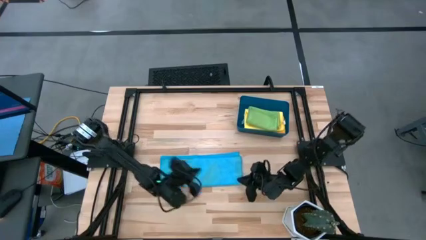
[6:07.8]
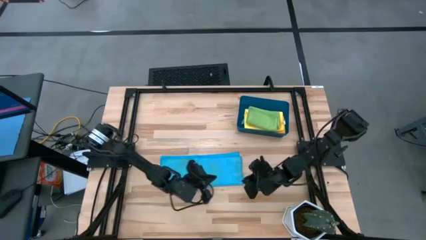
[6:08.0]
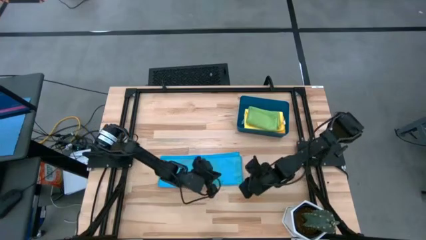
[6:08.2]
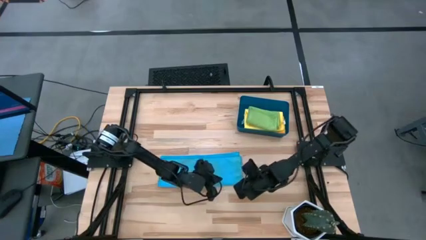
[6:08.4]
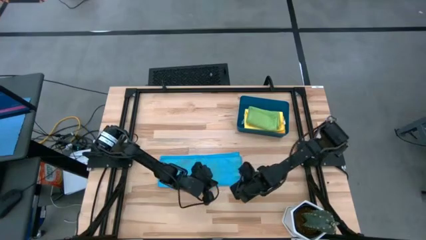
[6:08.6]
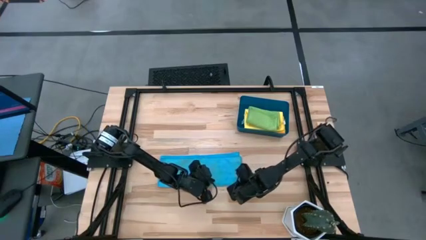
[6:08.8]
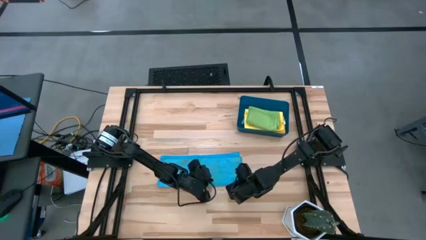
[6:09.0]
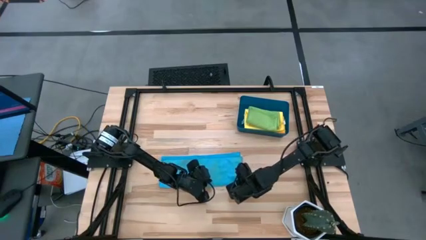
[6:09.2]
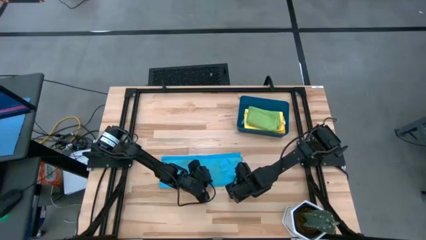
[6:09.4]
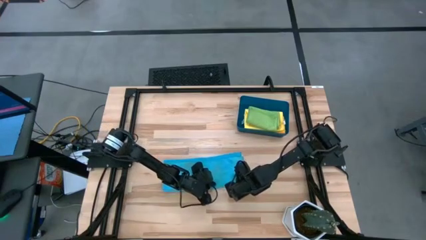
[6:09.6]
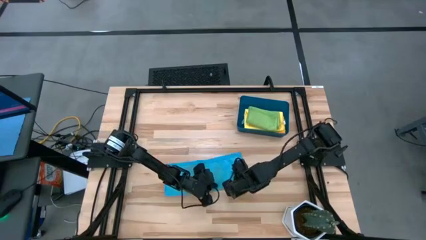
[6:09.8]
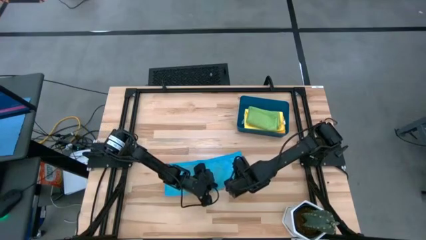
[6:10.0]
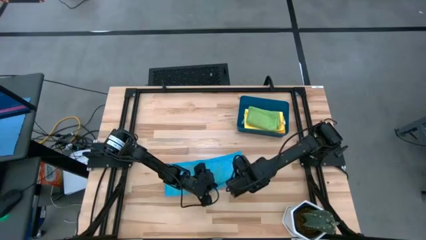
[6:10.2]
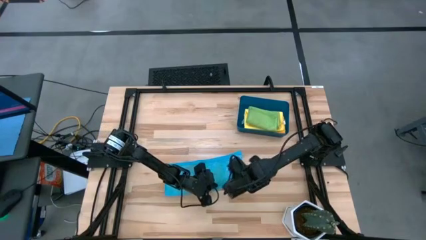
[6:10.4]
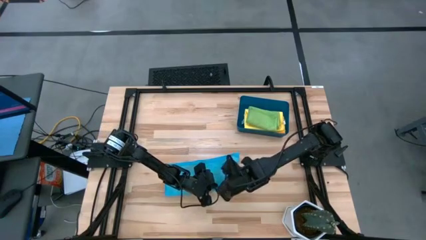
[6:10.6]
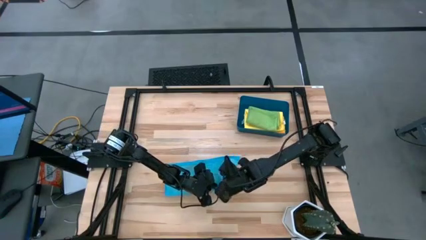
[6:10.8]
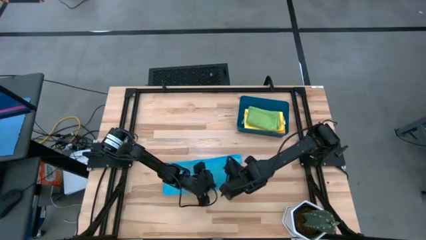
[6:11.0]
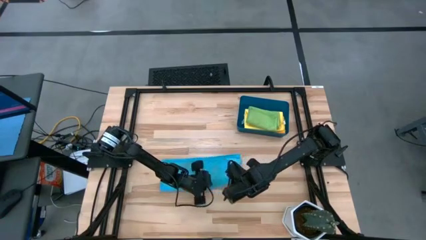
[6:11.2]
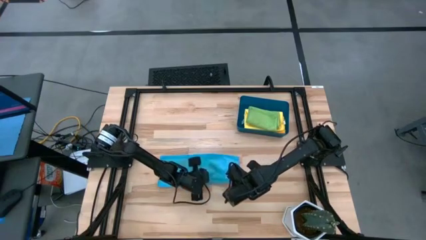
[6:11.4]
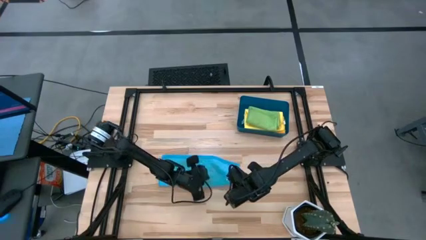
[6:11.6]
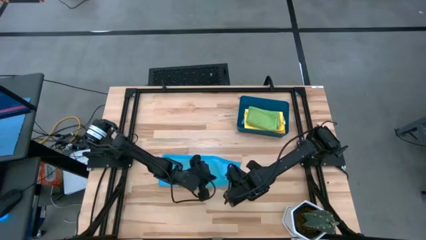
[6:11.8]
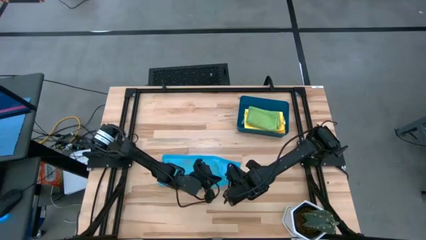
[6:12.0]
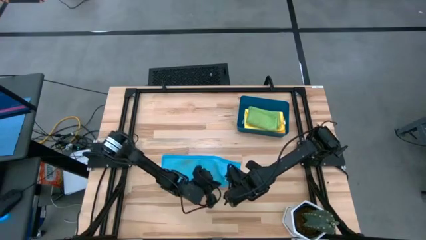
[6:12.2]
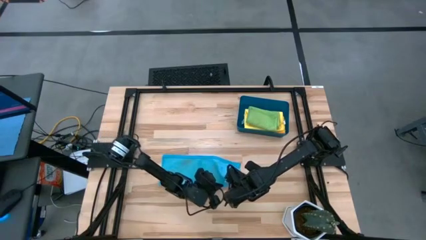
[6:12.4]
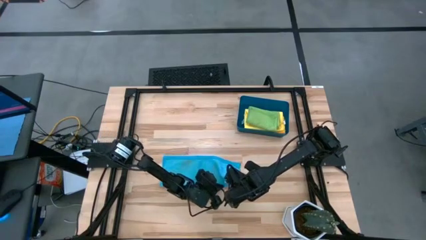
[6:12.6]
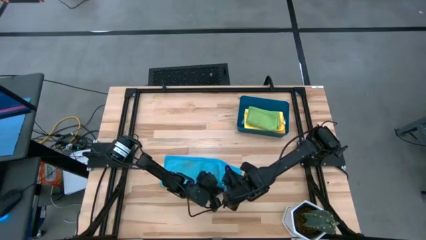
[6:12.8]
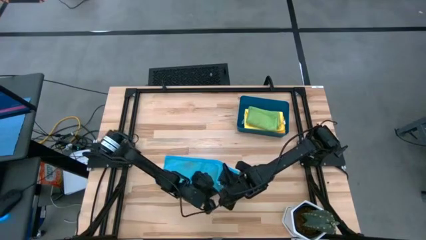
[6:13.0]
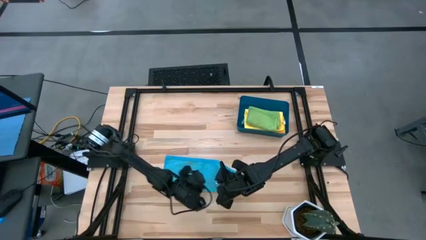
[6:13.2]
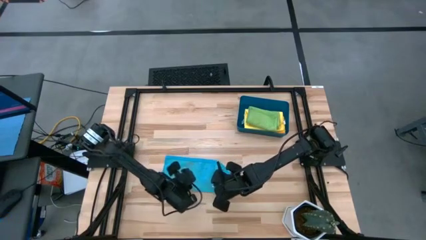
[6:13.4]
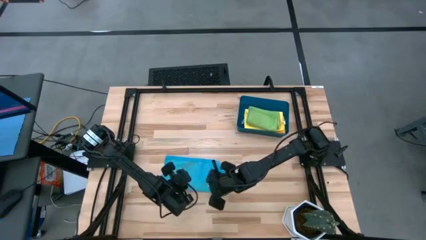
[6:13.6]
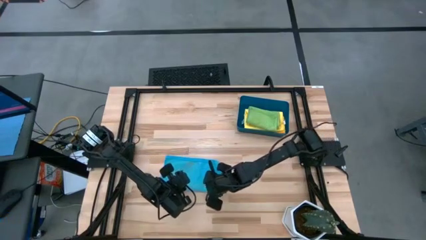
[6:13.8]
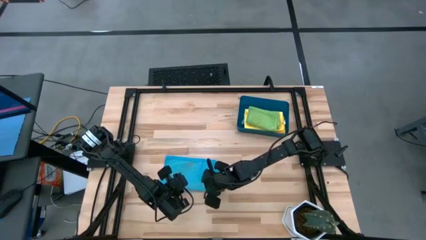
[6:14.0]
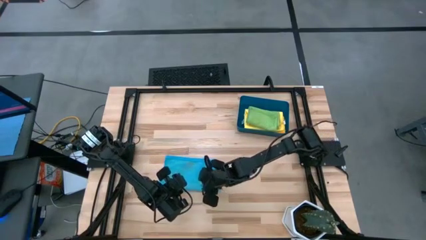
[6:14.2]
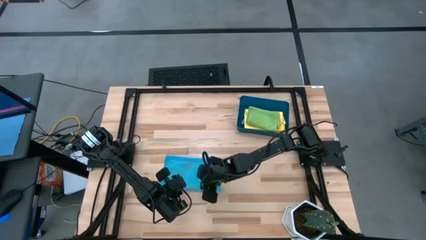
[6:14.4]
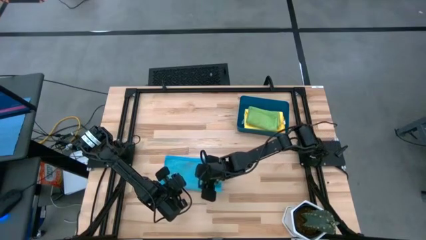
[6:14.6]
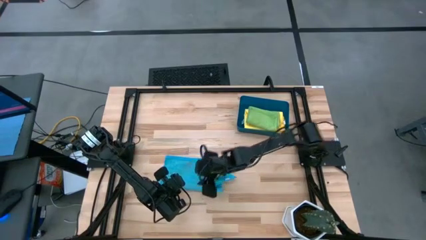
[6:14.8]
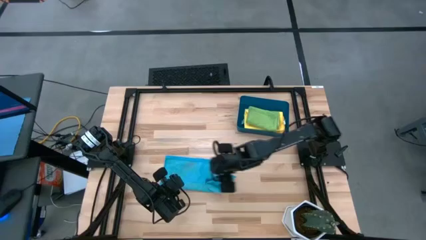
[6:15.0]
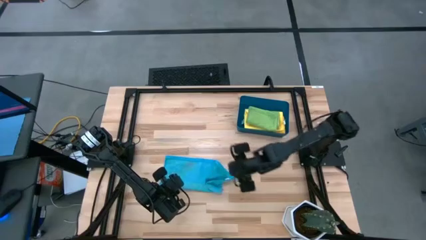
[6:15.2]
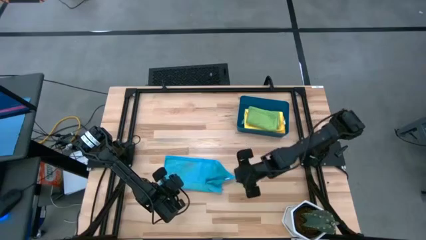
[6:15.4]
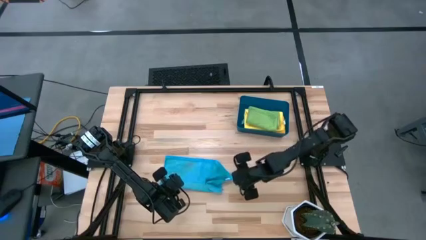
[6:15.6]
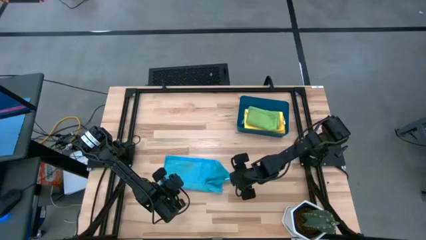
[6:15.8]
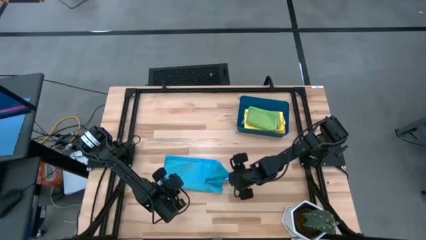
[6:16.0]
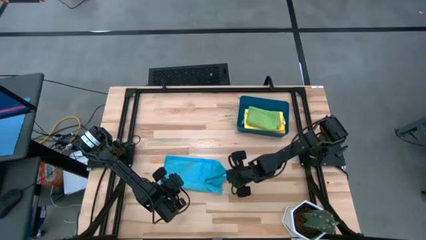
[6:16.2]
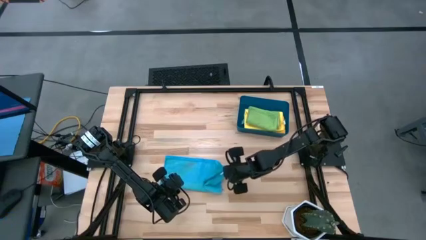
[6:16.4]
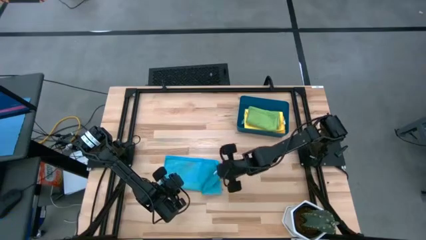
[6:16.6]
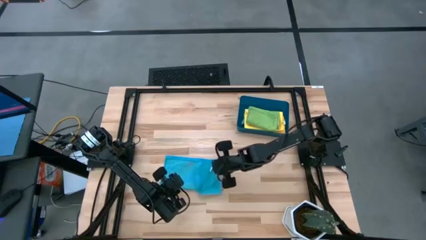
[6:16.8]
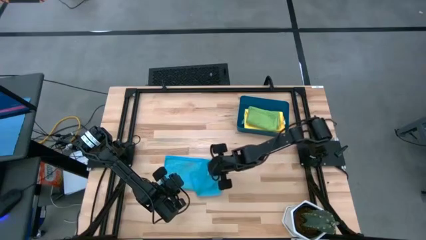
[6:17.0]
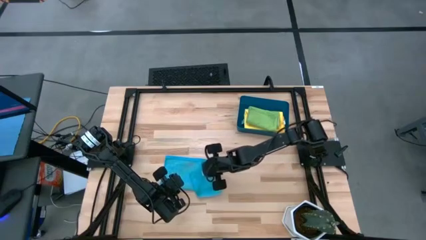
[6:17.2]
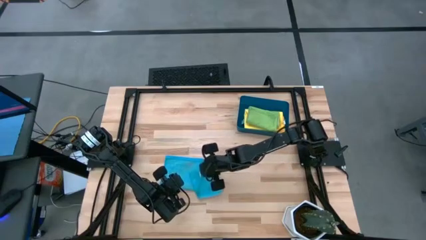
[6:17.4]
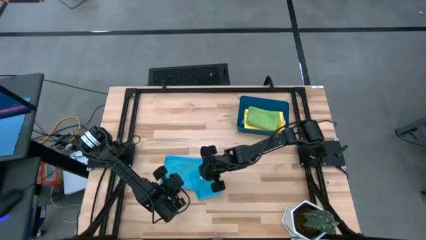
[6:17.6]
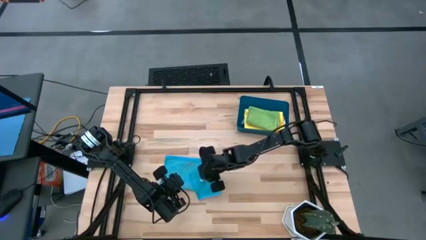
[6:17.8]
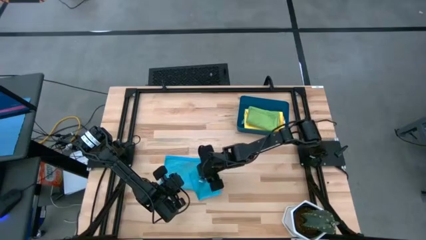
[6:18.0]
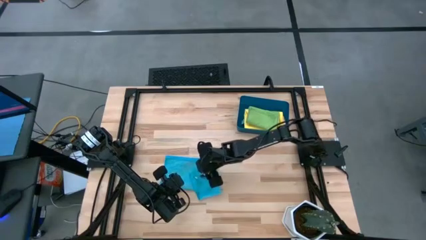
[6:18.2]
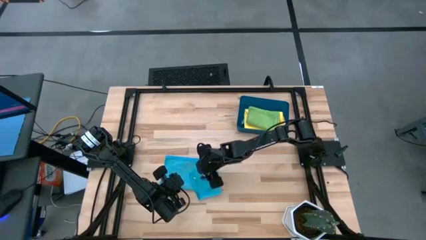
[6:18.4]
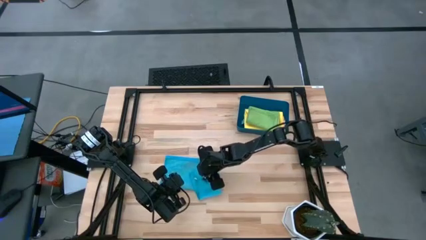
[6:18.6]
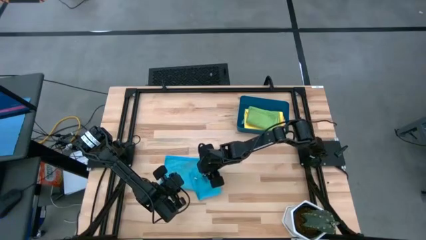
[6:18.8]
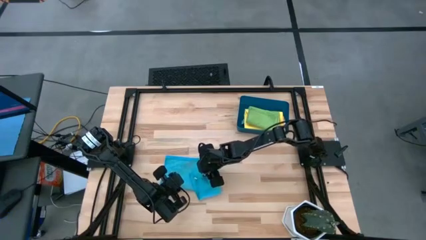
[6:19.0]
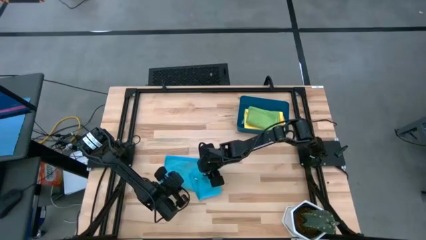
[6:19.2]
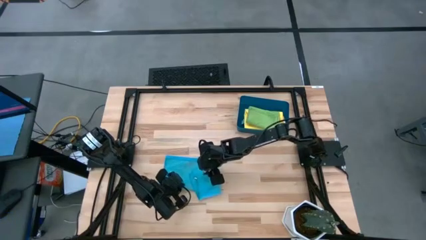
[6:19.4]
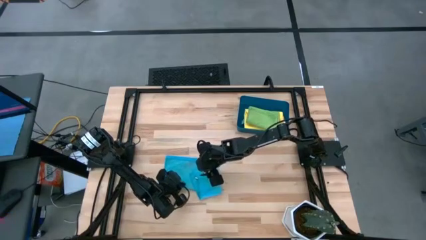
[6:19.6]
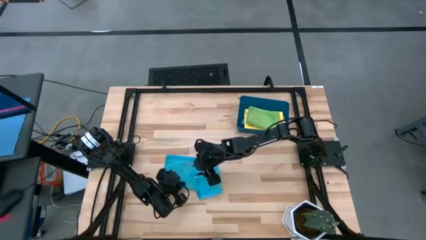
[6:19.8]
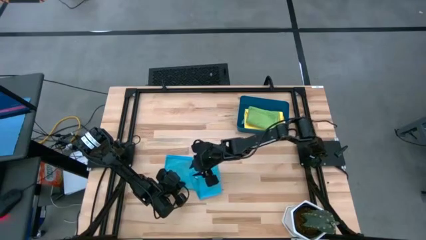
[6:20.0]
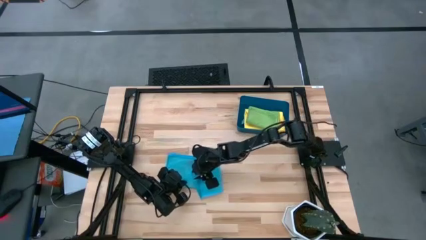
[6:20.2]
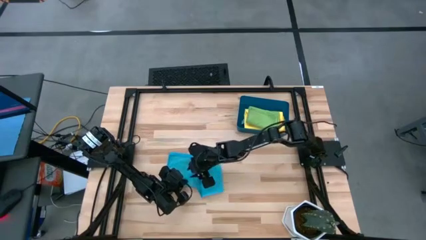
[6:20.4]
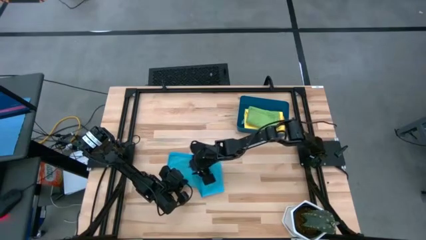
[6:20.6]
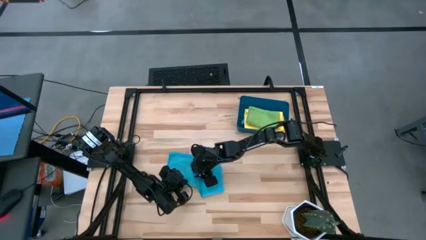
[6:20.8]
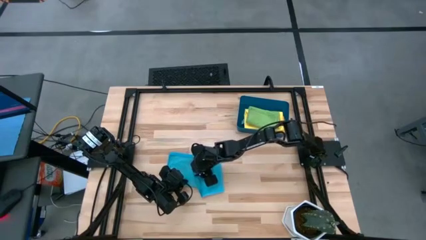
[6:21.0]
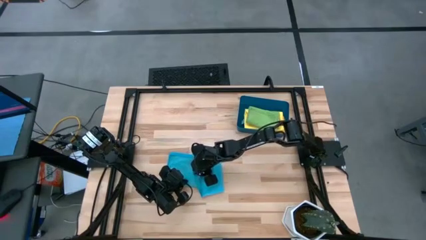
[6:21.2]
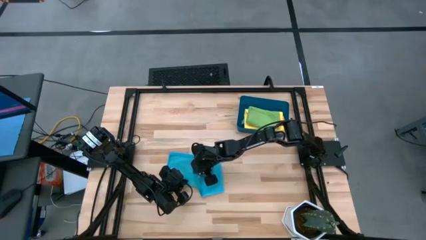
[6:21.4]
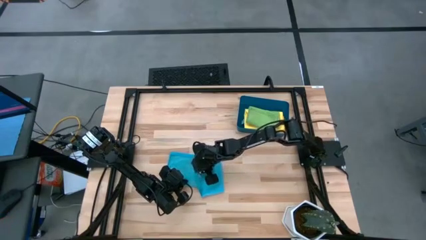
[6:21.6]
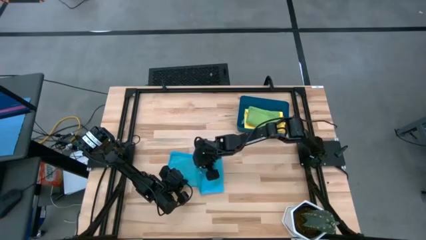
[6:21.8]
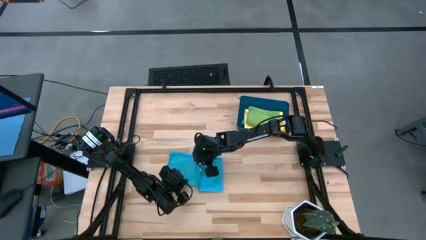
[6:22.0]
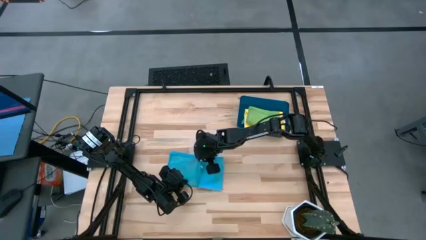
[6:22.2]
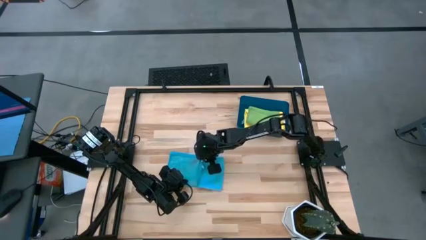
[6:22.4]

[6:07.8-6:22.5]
Task: Fold microfiber towels
Fold the blue microfiber cloth

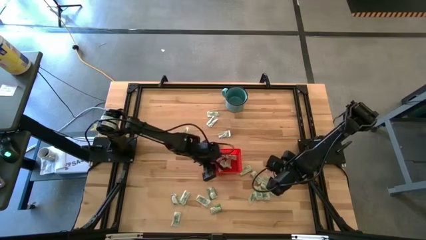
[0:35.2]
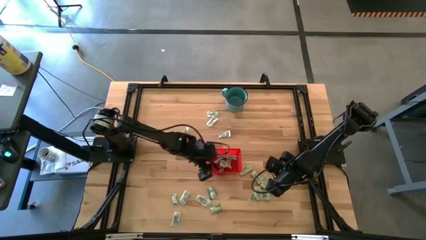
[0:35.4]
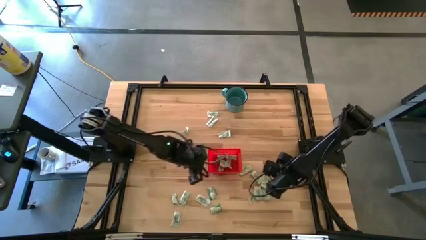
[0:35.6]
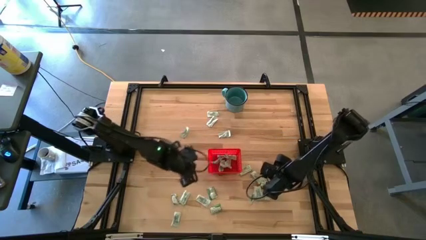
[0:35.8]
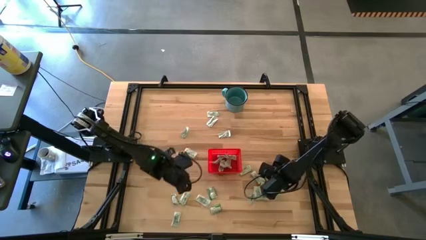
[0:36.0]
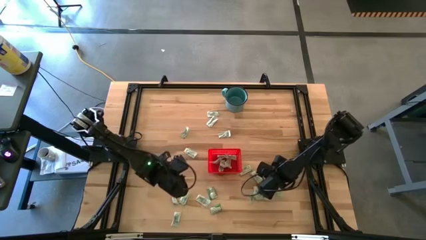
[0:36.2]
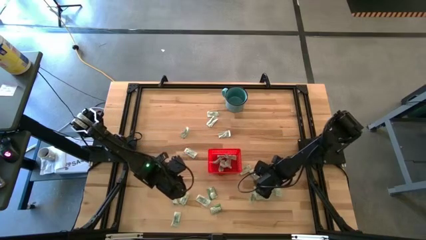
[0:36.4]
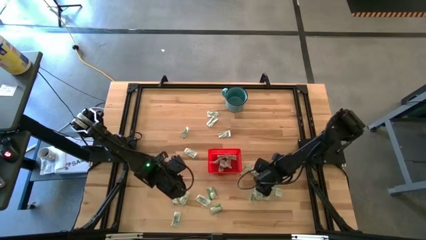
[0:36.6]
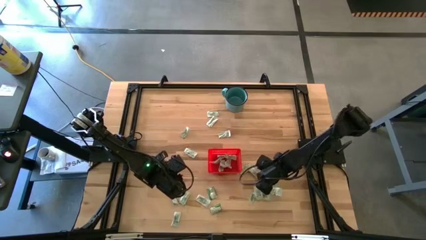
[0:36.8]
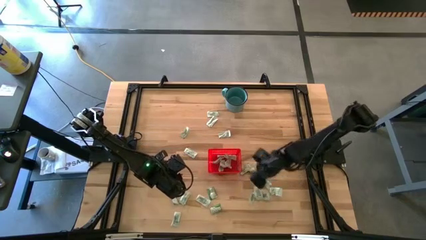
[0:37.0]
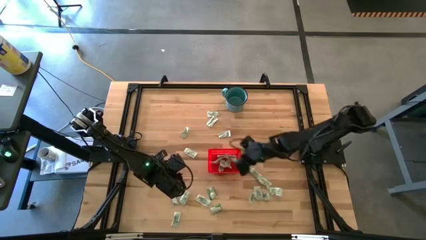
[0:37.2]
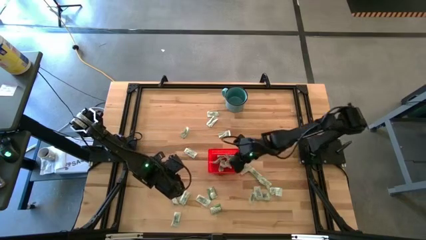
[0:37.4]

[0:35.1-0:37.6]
Task: Pick and place Stevia / Truvia into bins
Put the green stevia packet into the red bin
